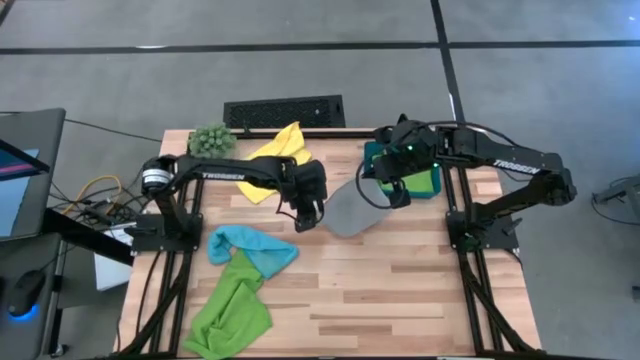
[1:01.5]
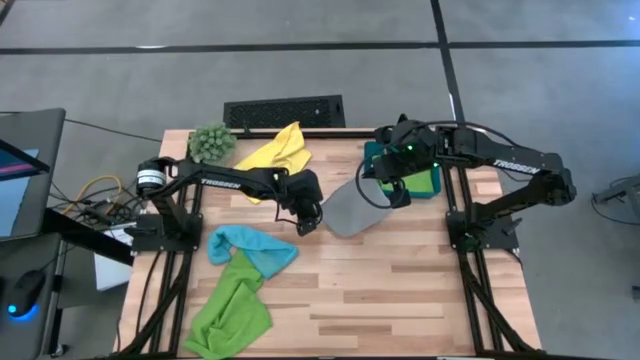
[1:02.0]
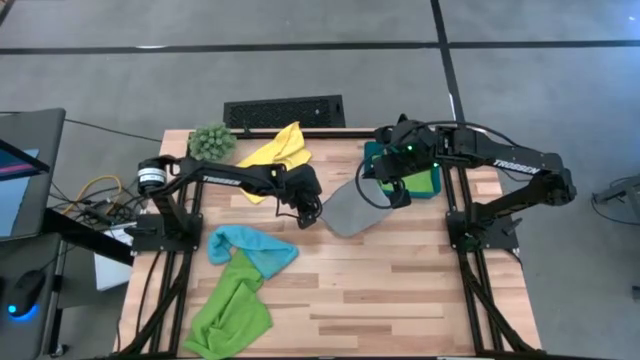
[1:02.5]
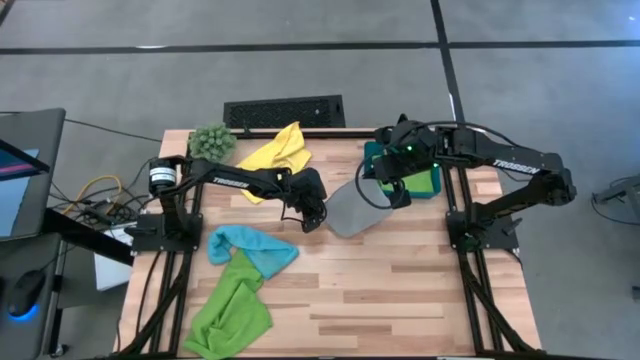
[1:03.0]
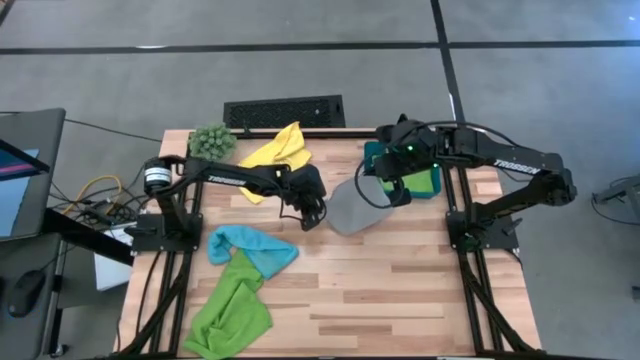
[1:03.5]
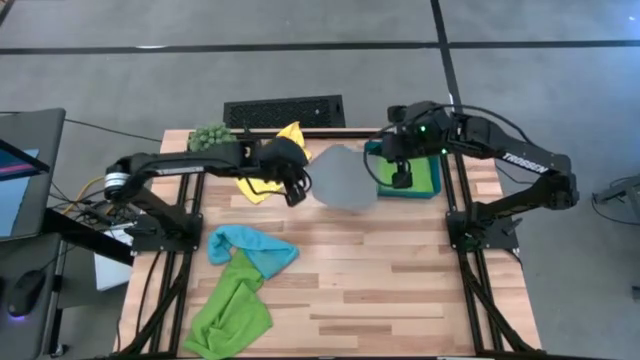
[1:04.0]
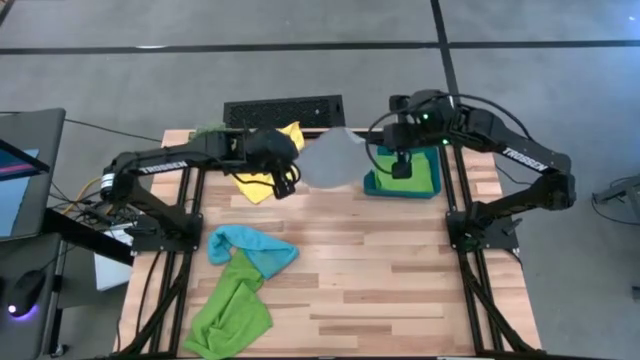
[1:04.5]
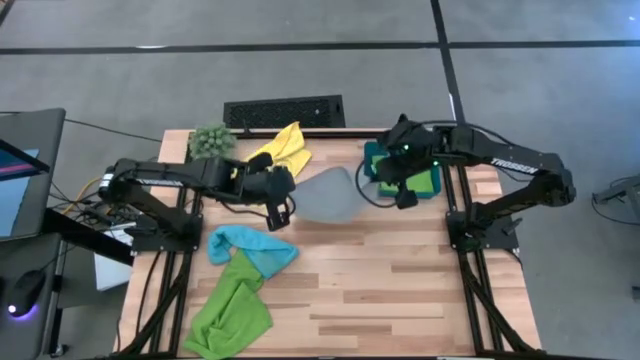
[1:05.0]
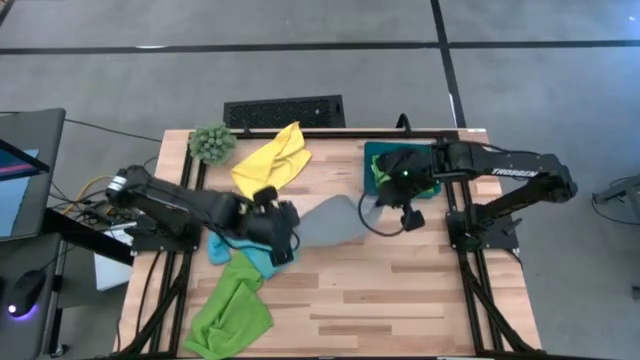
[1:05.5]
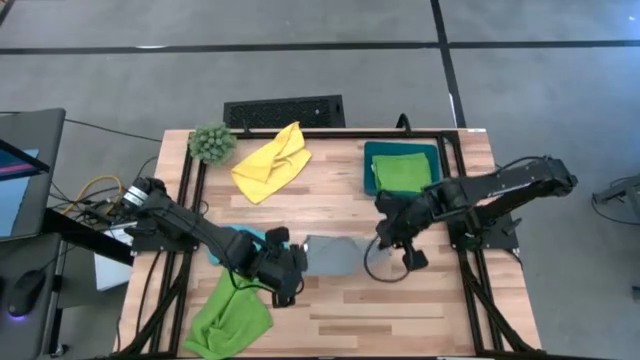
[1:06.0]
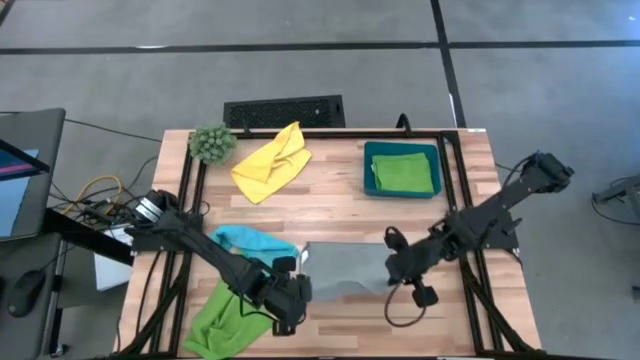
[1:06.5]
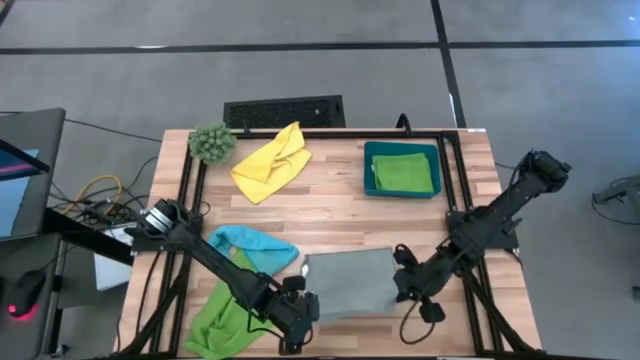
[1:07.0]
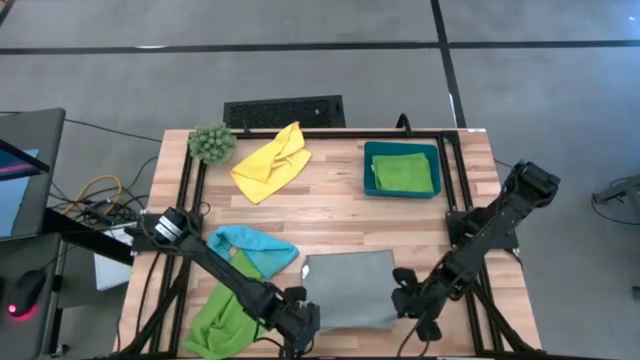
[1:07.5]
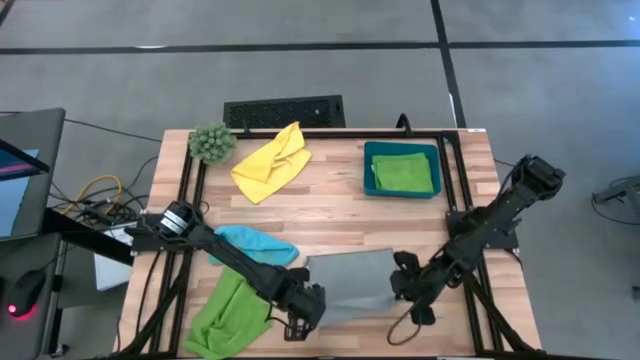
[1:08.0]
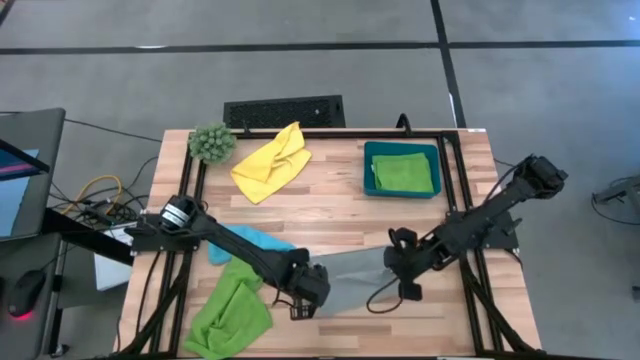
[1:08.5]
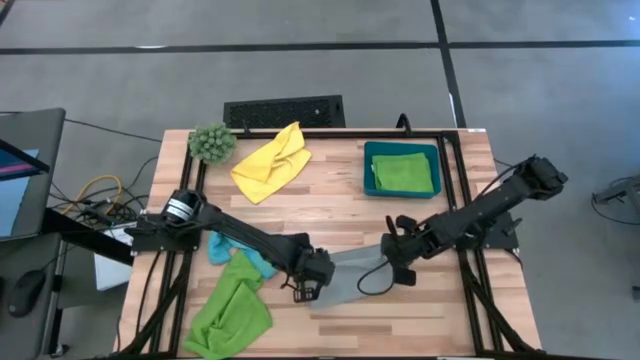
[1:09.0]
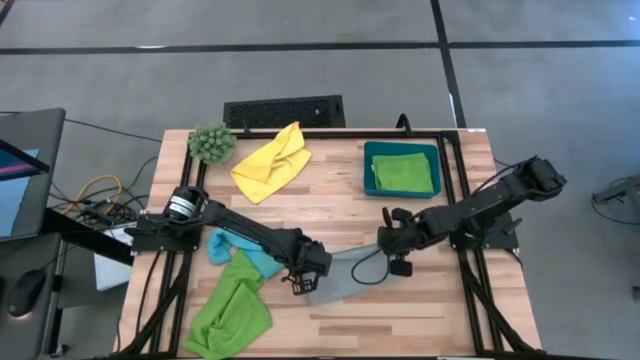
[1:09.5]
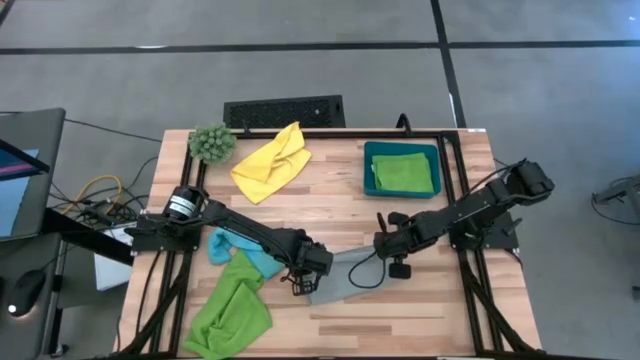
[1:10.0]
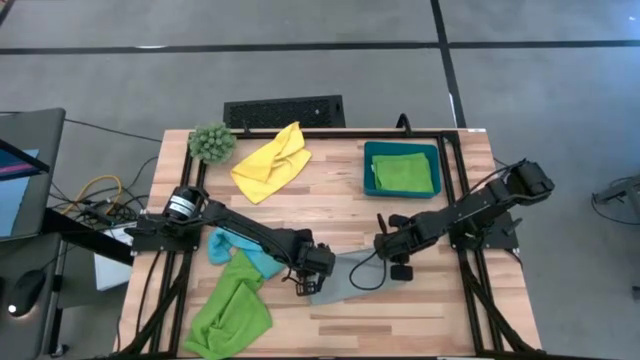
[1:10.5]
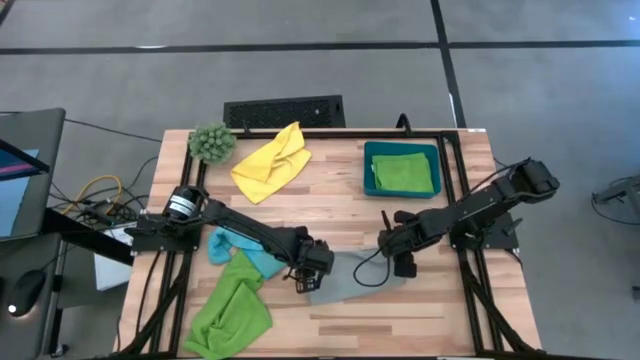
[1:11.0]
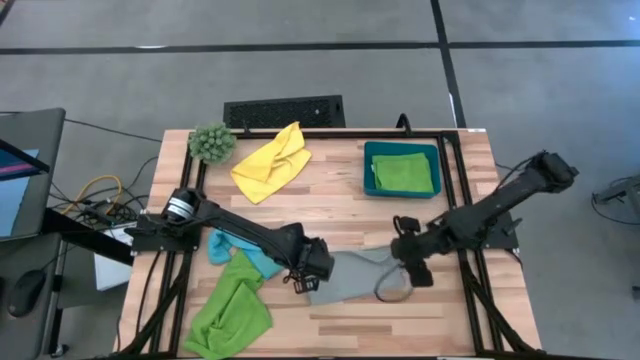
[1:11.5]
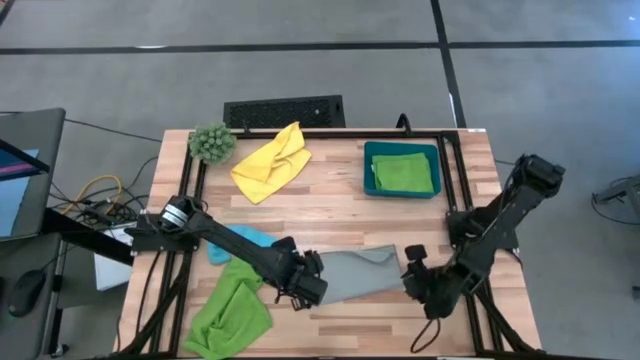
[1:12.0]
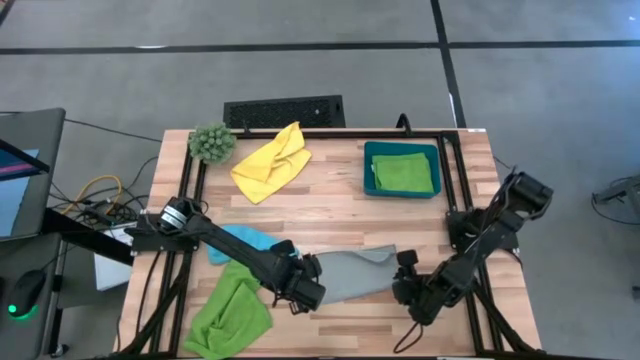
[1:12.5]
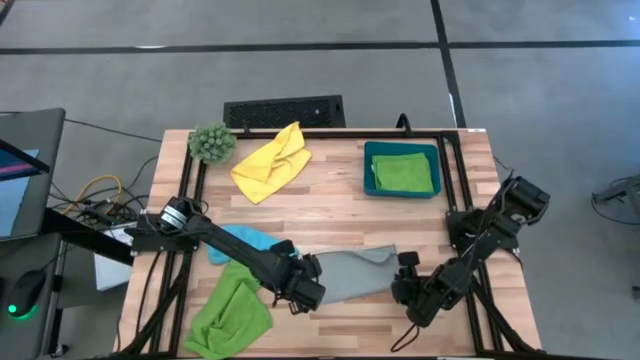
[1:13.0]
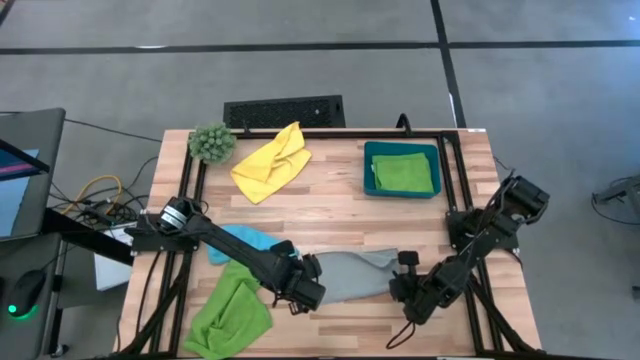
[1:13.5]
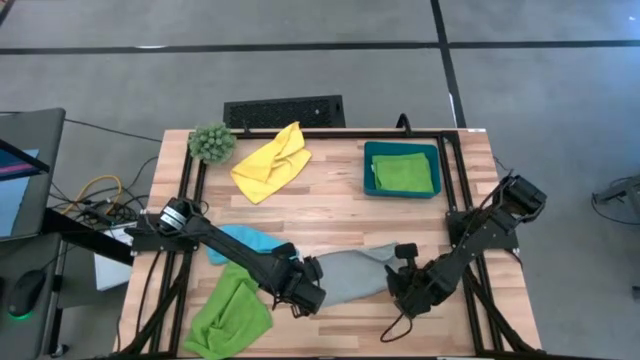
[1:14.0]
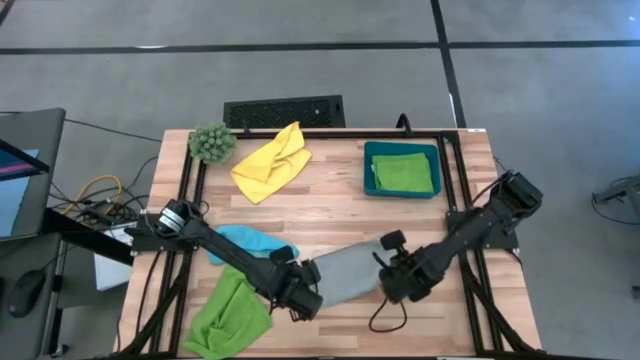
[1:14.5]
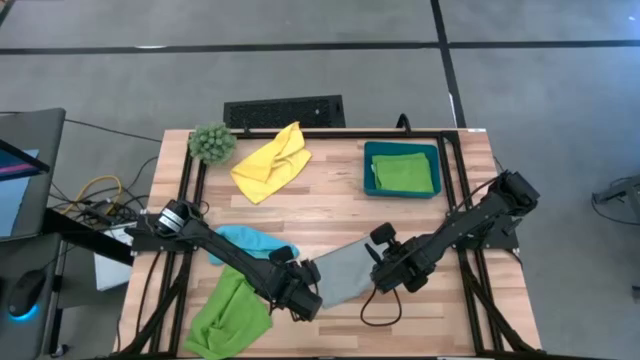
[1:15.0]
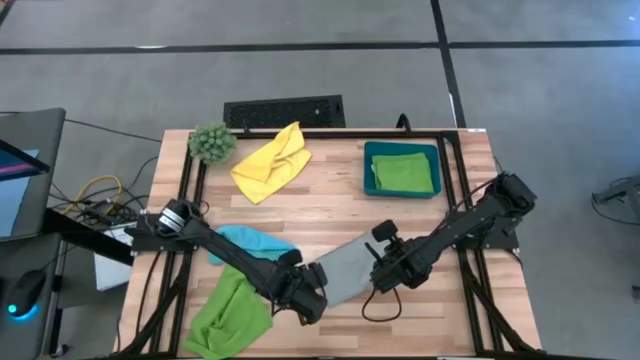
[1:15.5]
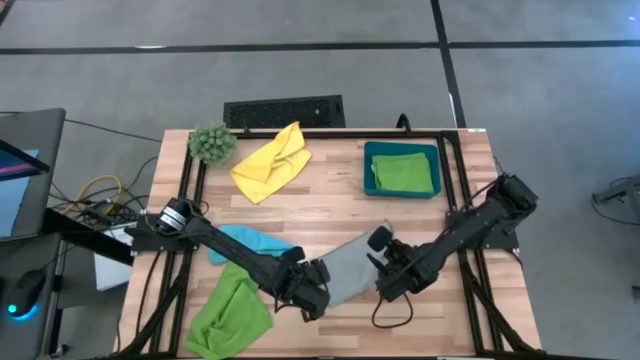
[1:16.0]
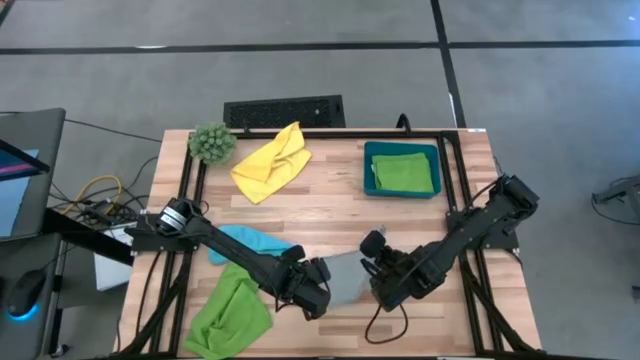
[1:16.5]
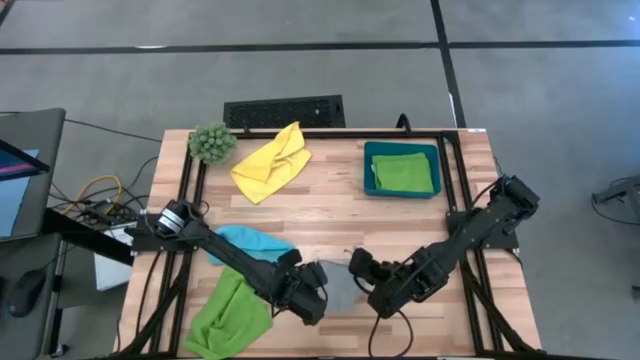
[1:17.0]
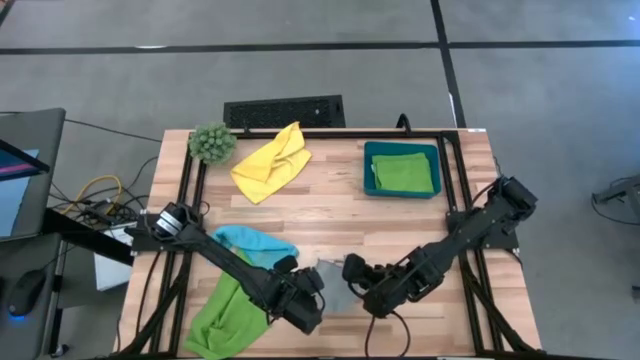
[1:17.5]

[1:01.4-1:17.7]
Task: Fold microfiber towels
Fold the dark white microfiber cloth

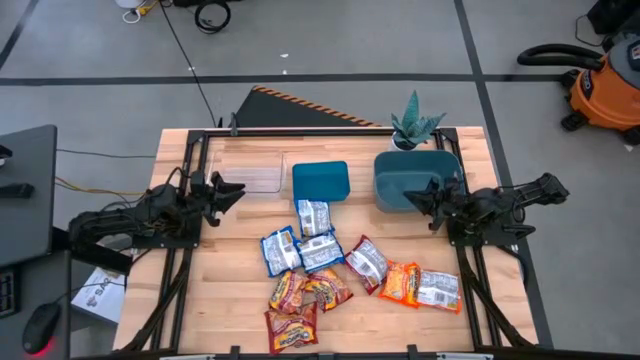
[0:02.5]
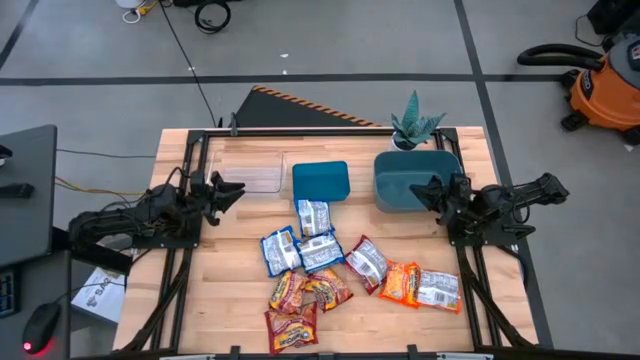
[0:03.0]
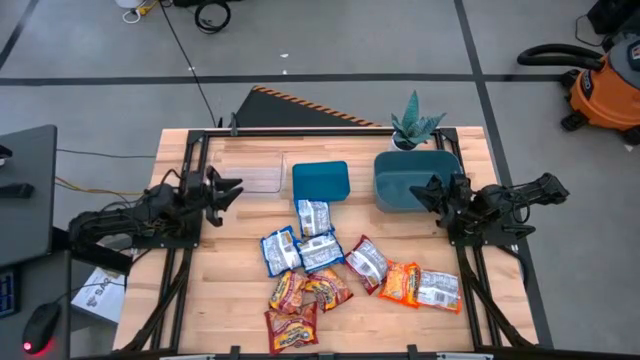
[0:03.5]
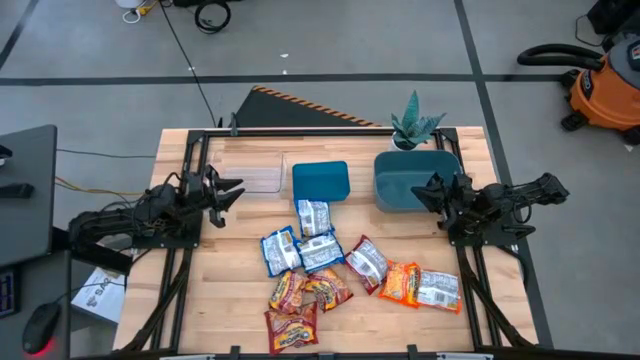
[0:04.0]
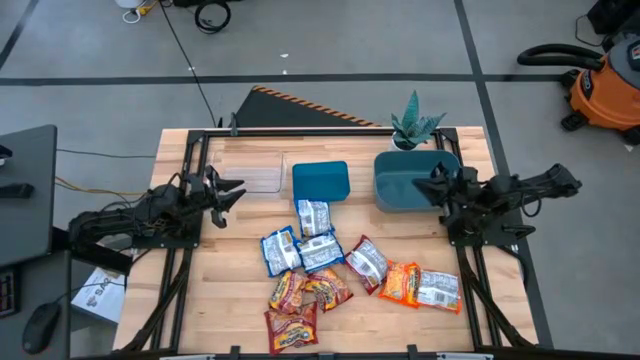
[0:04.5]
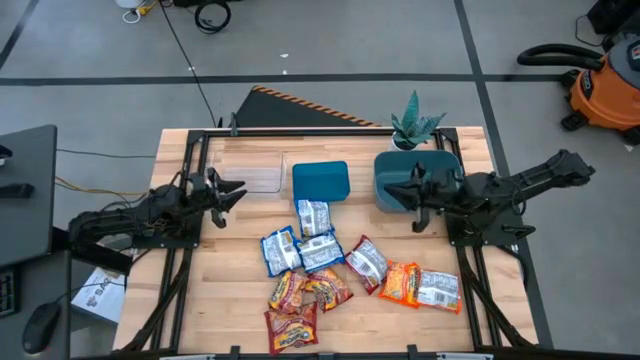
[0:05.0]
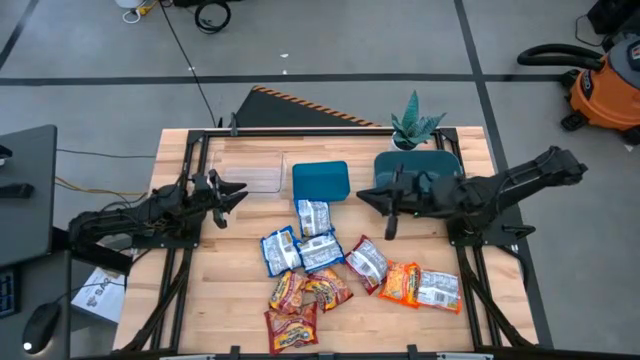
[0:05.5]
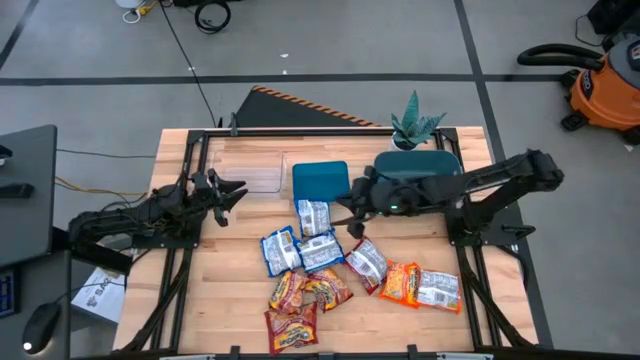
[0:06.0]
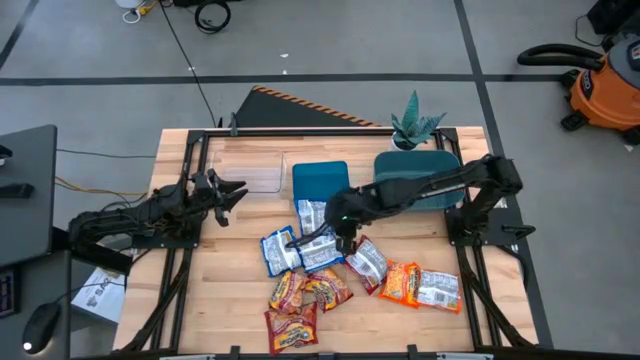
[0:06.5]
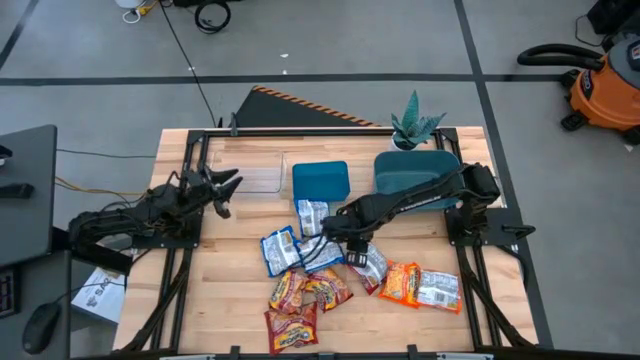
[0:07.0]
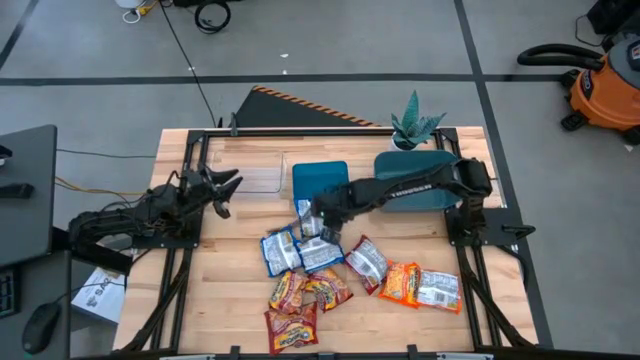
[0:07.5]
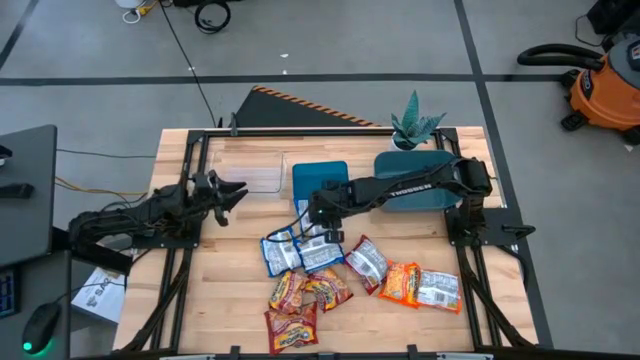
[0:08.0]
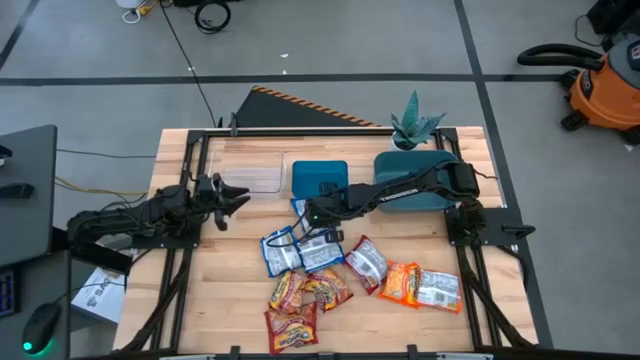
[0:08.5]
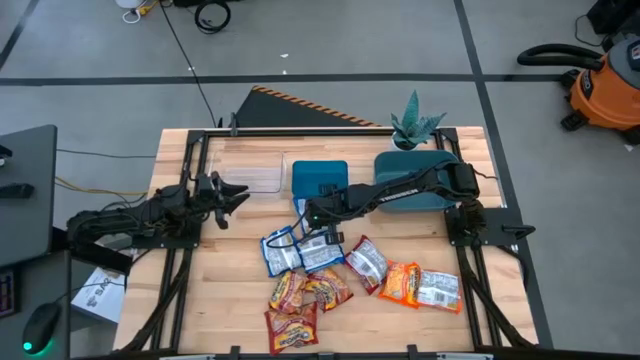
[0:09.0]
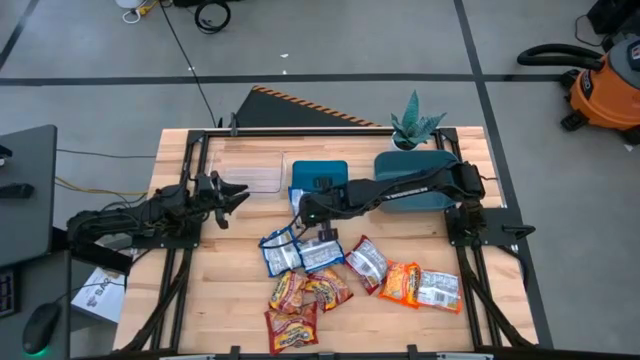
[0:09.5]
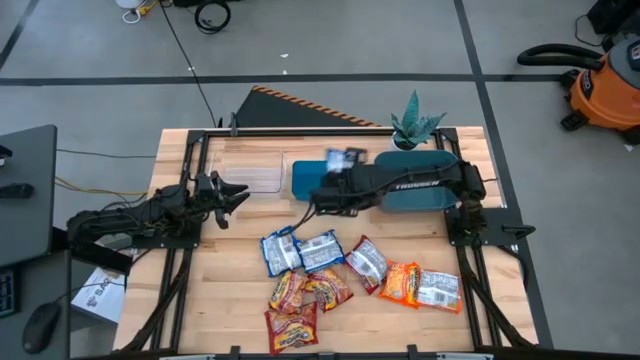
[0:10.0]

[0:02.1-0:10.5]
Task: Sort Maruchan noodles
Put the blue noodle pack into the green bin
